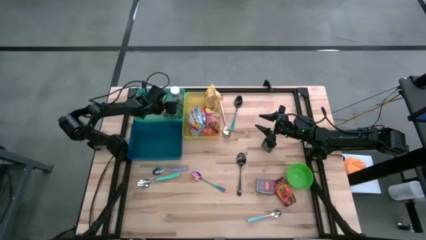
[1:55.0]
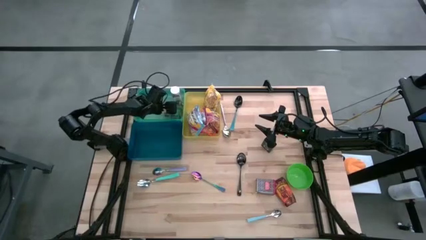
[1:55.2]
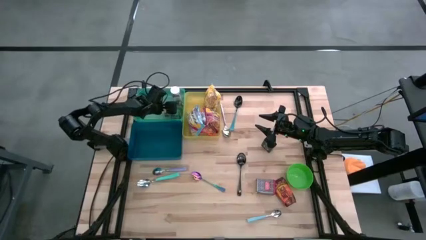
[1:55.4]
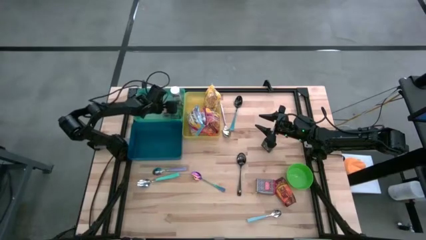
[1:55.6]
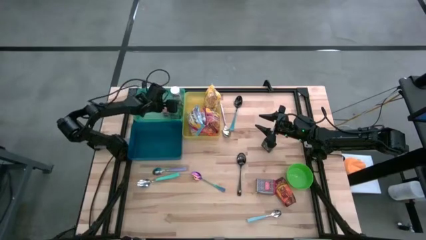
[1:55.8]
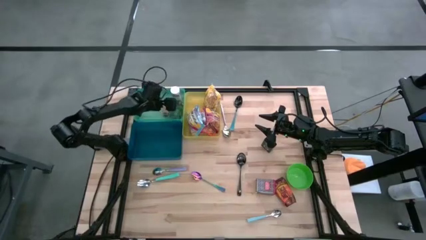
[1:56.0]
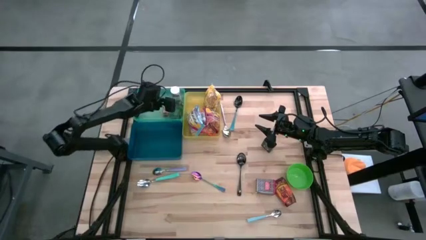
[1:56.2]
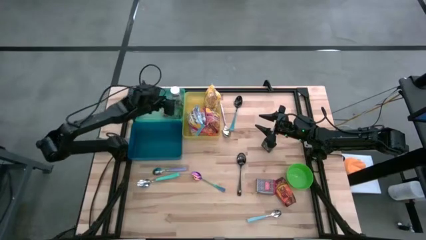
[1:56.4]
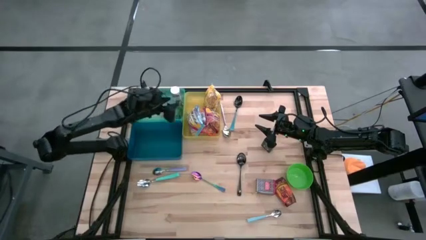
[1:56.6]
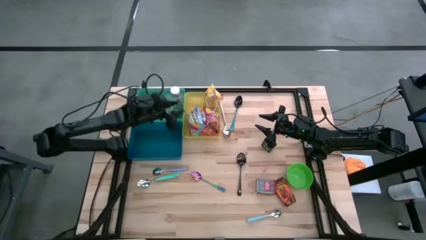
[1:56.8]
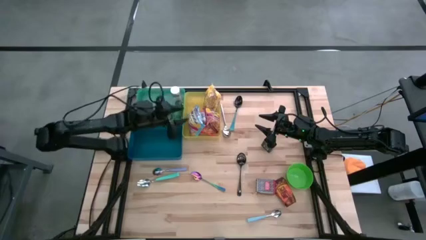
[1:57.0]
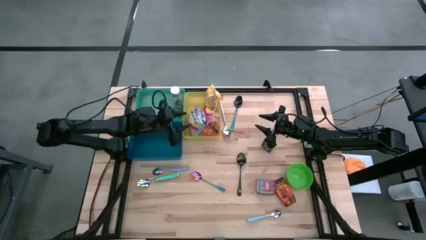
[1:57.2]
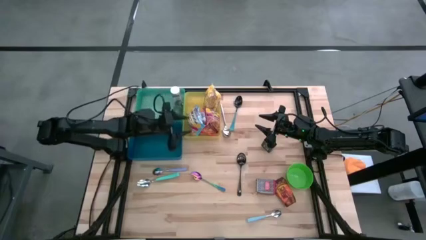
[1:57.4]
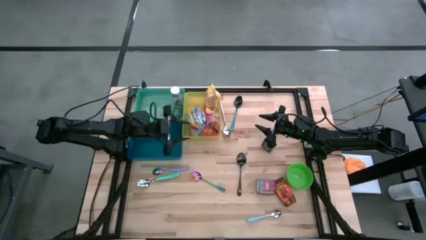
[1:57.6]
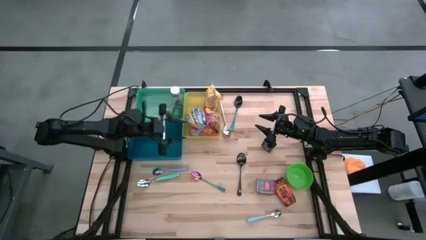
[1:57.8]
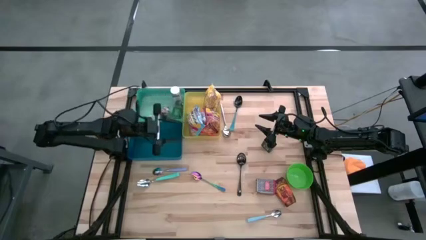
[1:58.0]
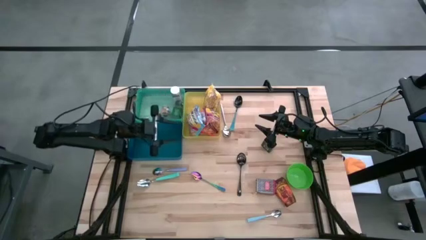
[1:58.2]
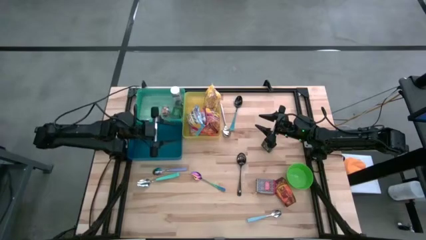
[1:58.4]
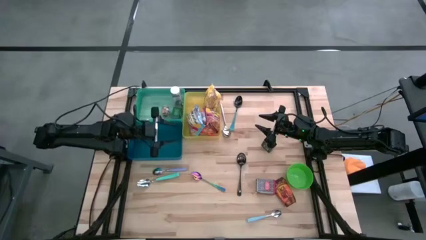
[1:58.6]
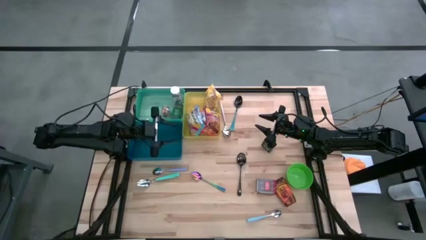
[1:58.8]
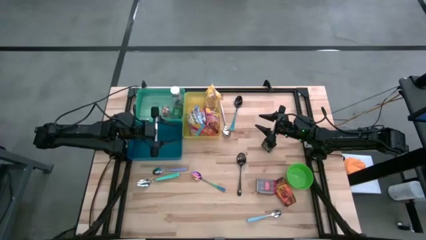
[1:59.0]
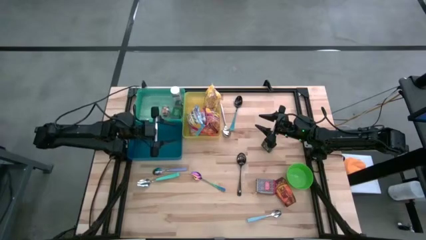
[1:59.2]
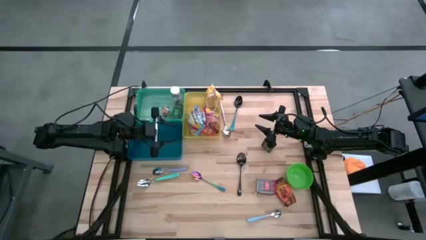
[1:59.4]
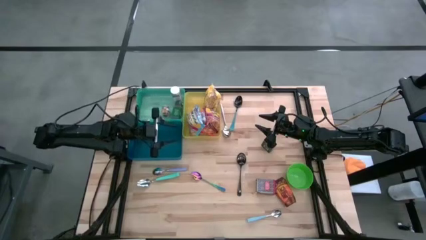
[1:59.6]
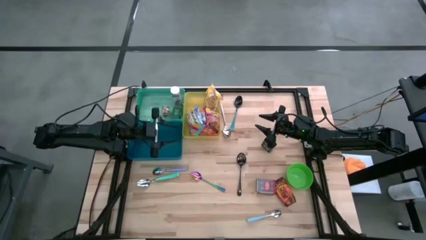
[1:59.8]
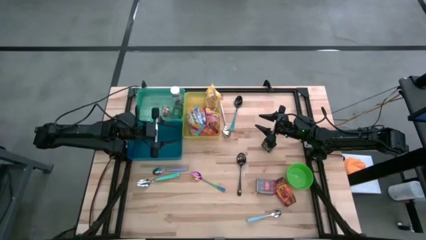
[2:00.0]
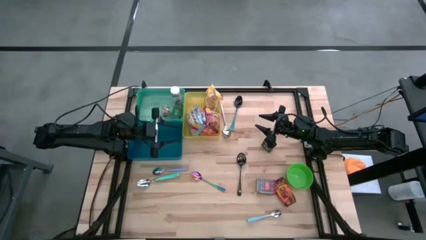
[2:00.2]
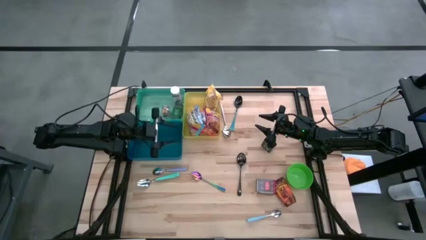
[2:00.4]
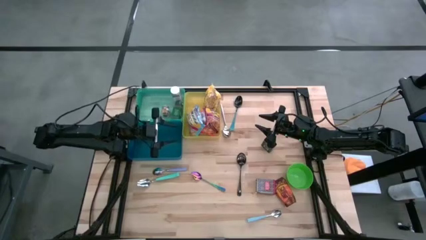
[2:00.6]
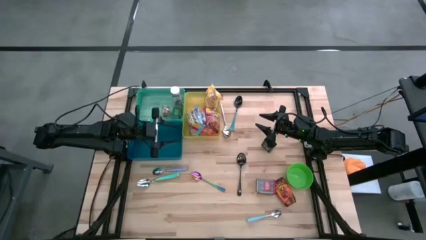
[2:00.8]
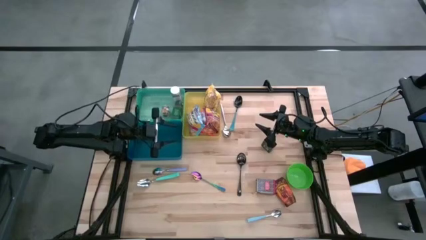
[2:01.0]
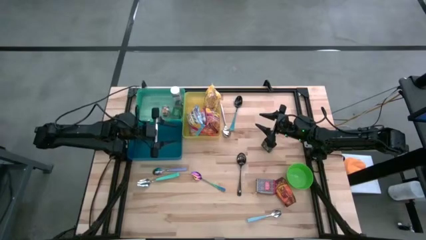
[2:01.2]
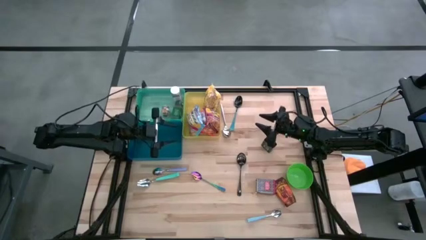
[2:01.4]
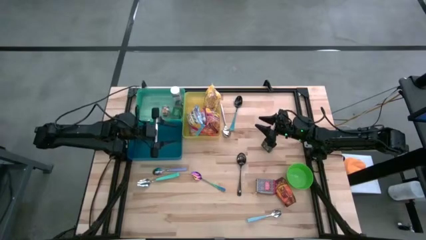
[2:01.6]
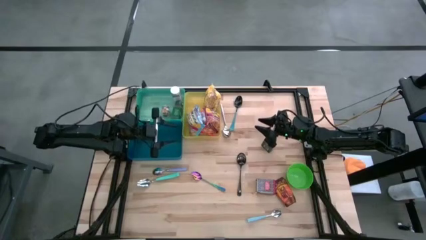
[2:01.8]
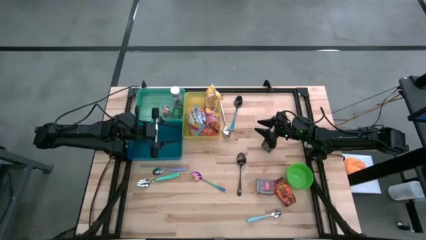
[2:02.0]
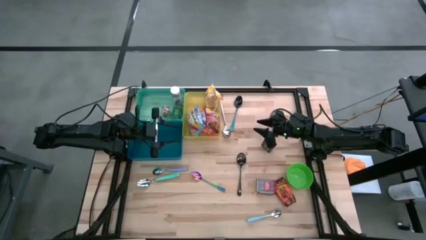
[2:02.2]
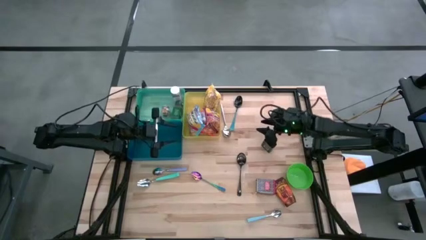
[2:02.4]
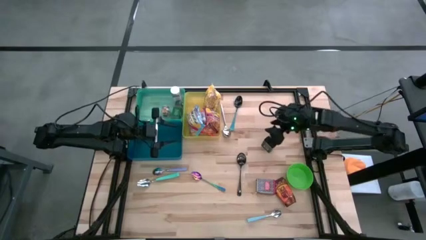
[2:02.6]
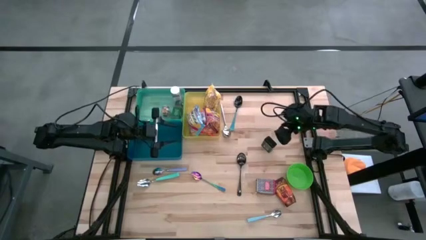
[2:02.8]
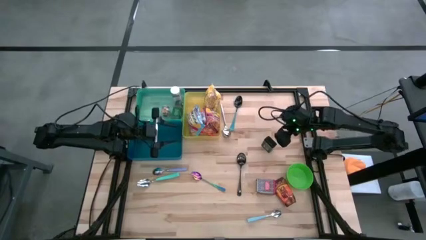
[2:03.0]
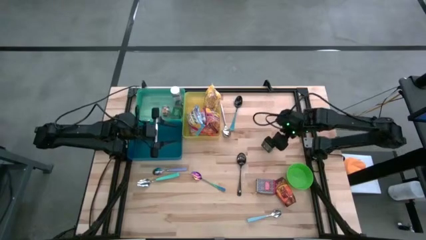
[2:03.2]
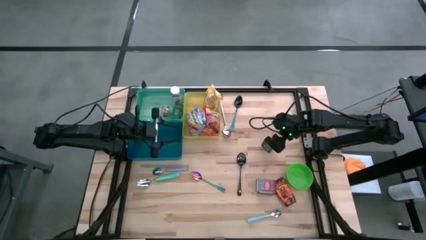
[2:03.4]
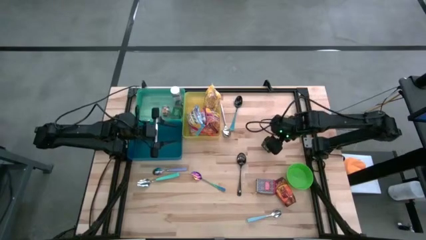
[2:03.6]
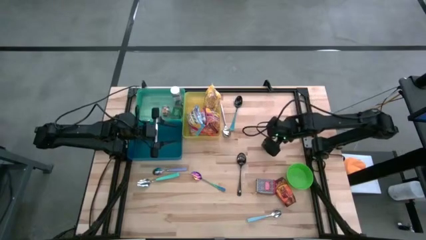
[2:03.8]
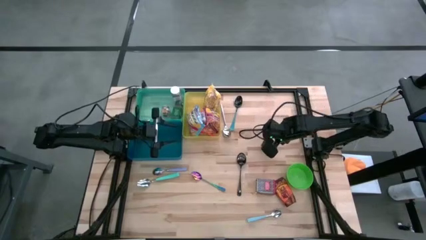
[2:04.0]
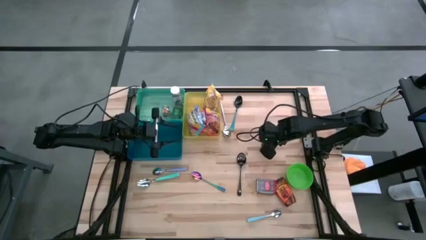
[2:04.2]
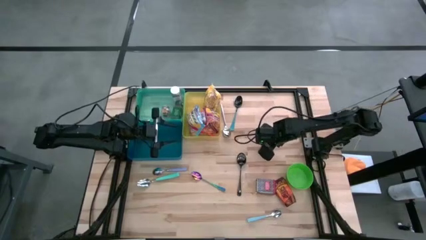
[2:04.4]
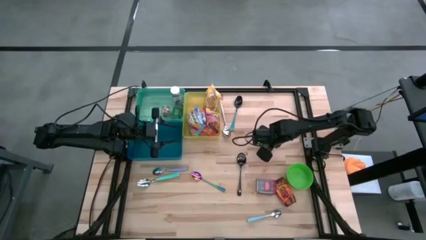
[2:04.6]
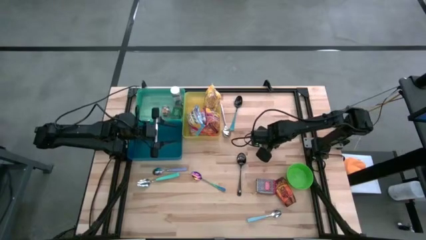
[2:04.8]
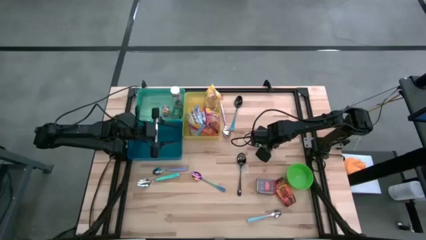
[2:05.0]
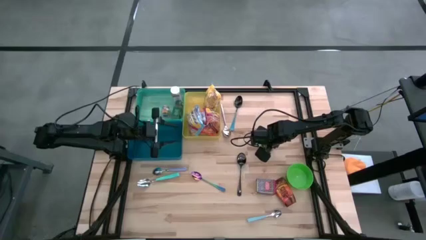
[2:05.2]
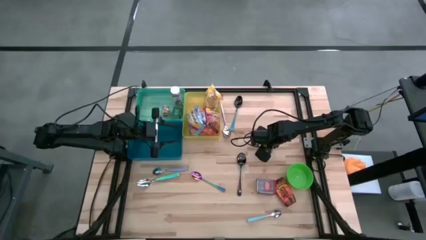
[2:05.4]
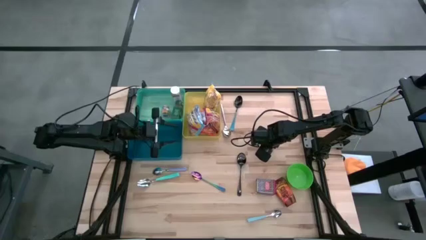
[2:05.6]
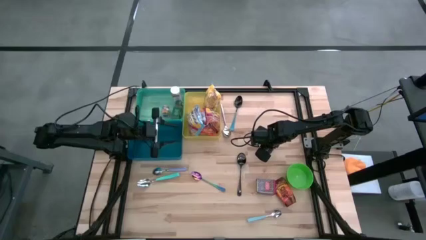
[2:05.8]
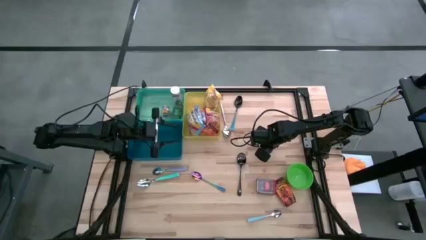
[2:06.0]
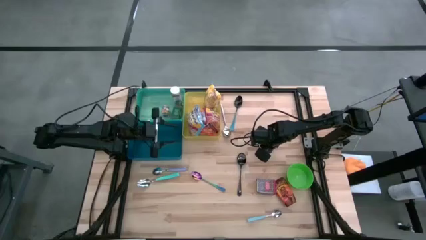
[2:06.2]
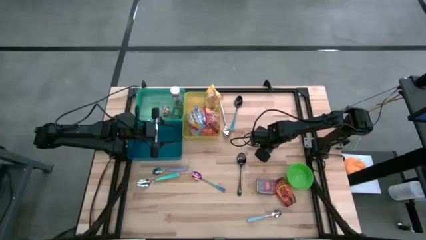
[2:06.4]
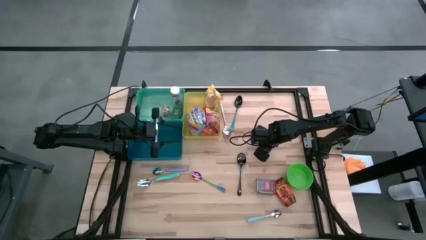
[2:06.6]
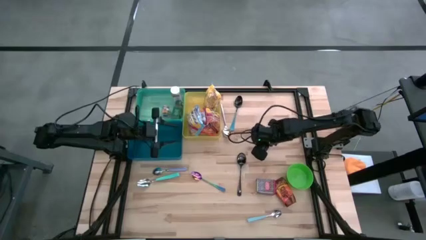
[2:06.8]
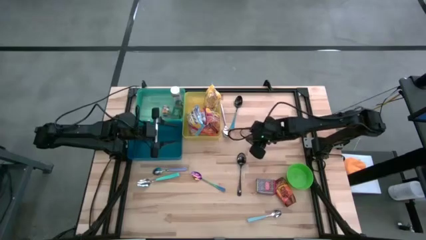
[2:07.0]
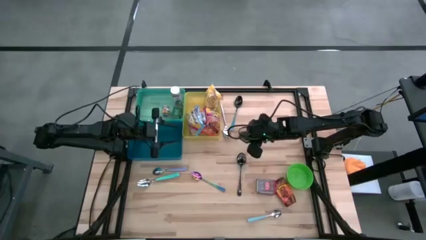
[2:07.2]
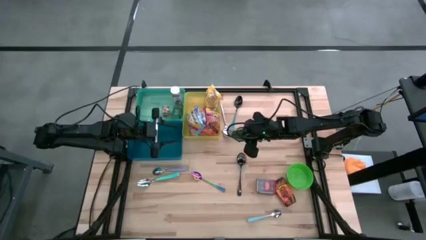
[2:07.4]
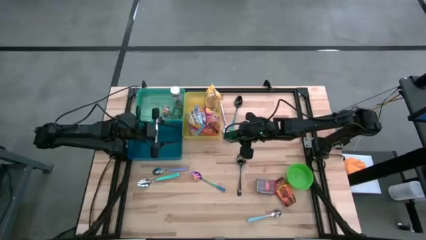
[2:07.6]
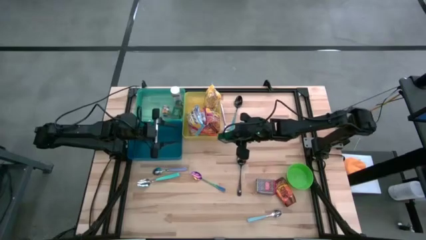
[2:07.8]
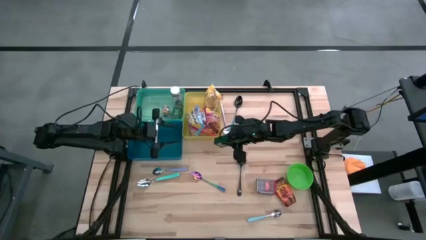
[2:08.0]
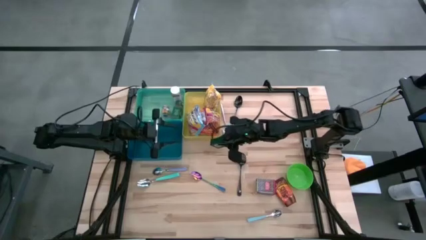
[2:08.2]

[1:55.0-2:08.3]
Put the green spice can into the green bin
